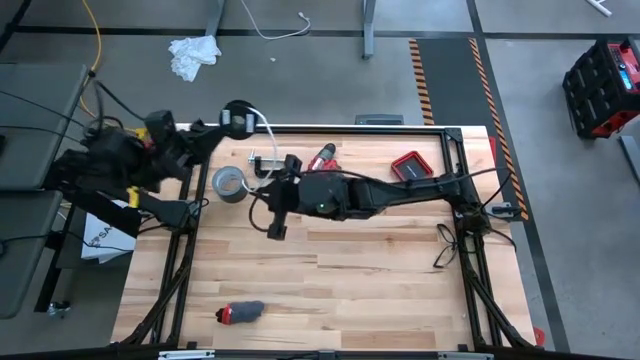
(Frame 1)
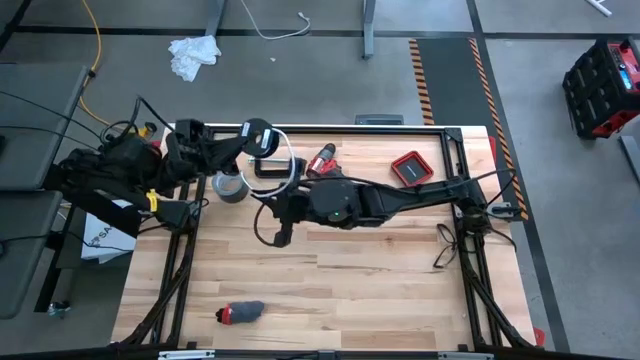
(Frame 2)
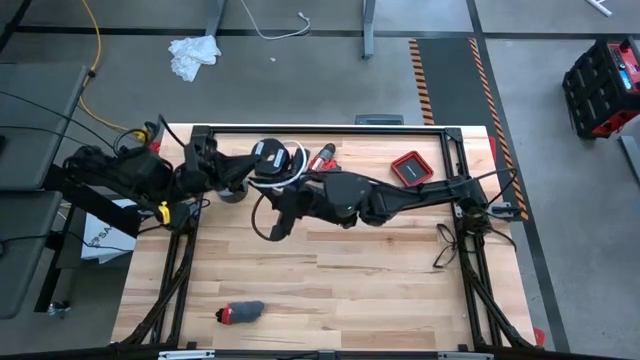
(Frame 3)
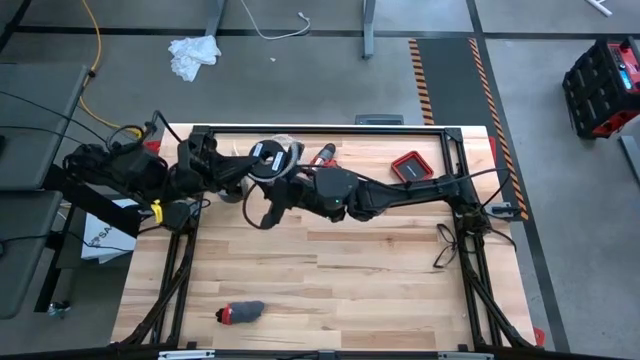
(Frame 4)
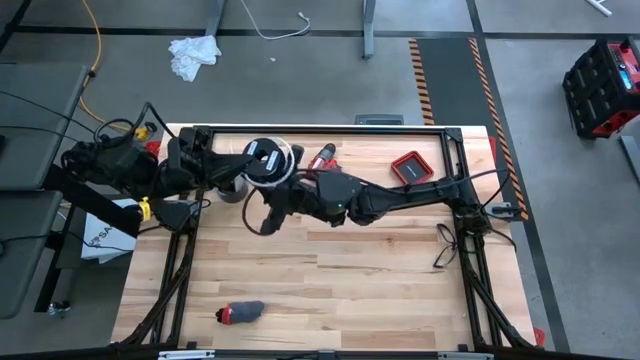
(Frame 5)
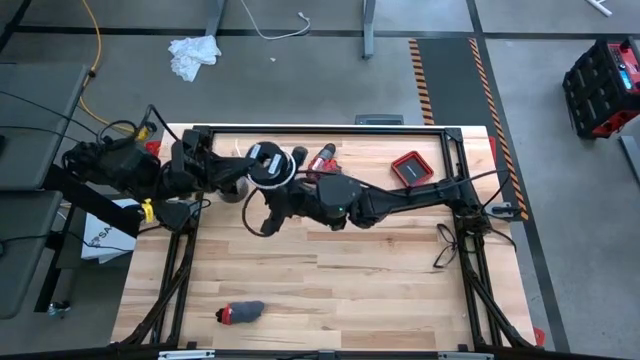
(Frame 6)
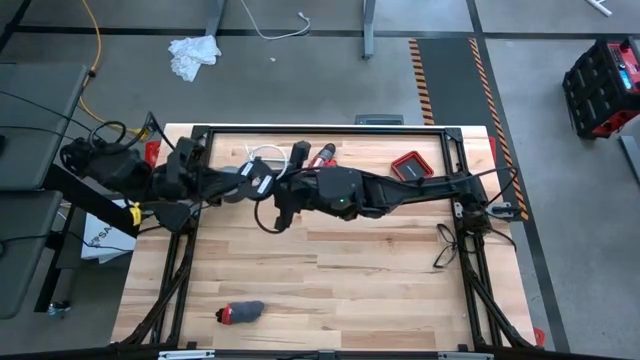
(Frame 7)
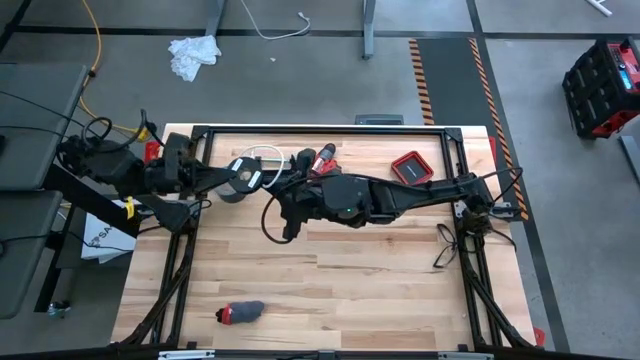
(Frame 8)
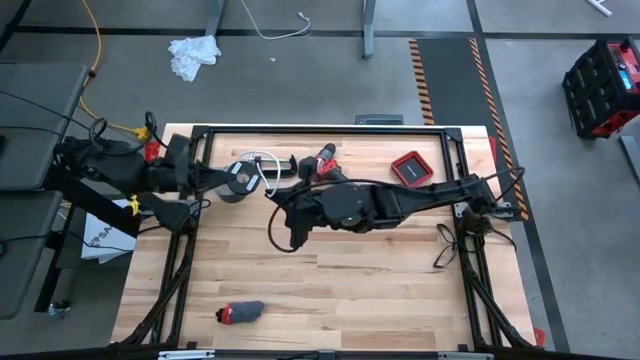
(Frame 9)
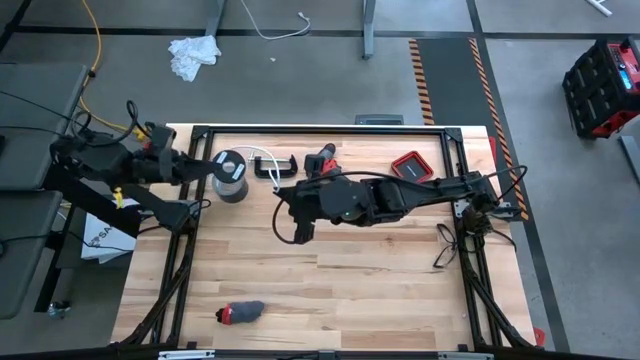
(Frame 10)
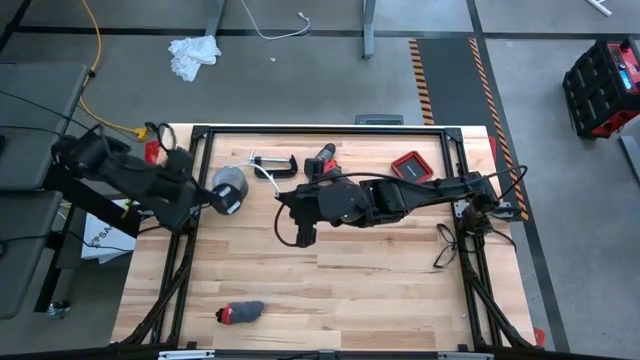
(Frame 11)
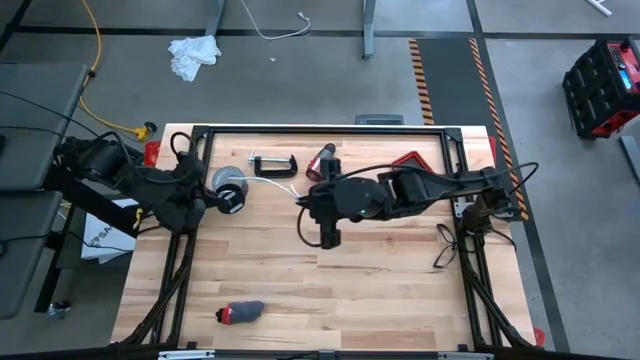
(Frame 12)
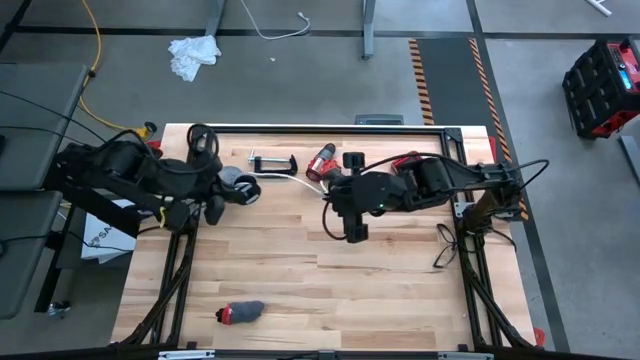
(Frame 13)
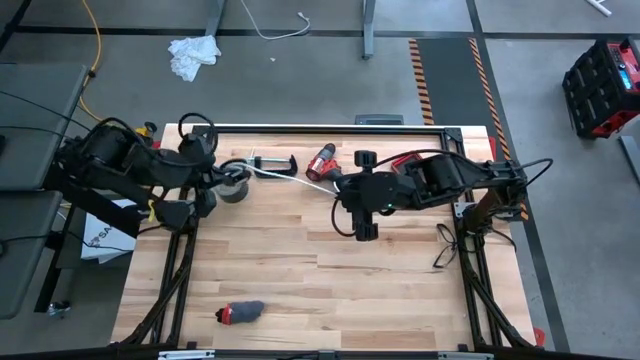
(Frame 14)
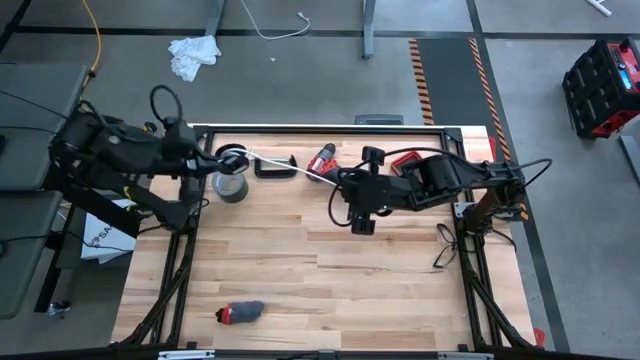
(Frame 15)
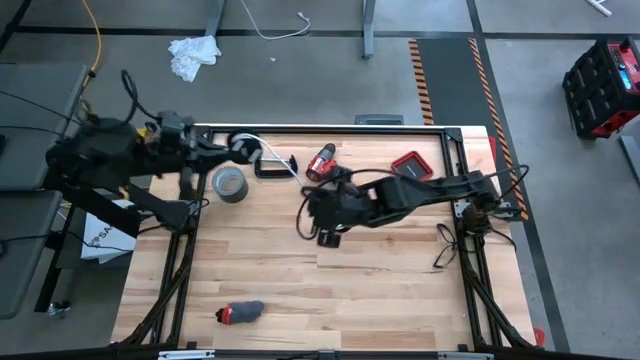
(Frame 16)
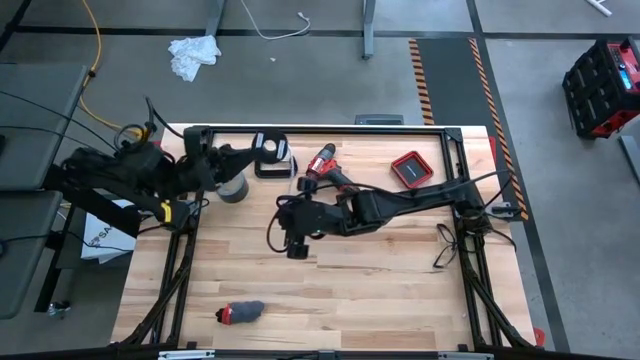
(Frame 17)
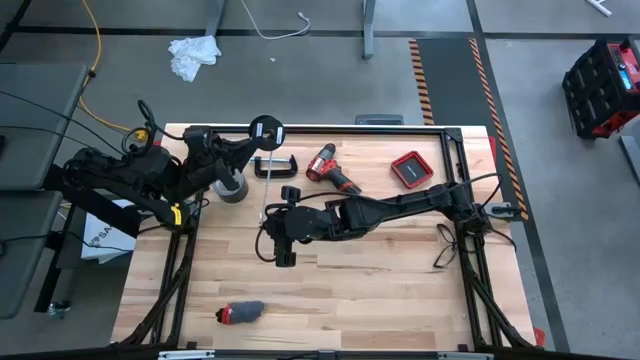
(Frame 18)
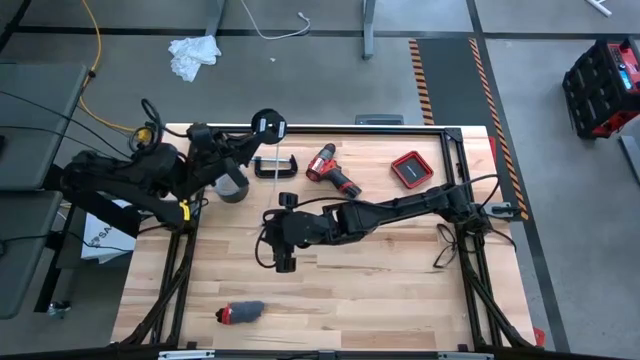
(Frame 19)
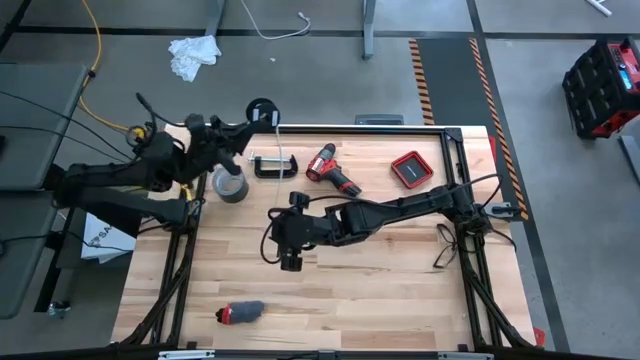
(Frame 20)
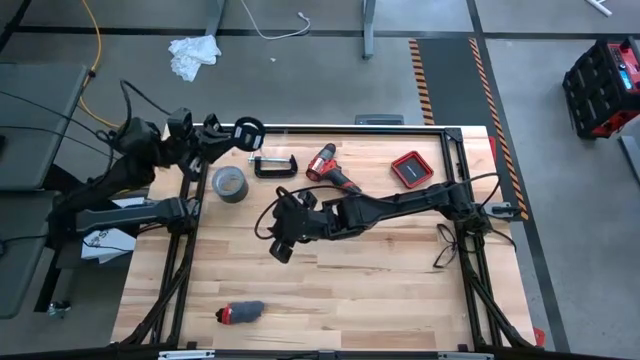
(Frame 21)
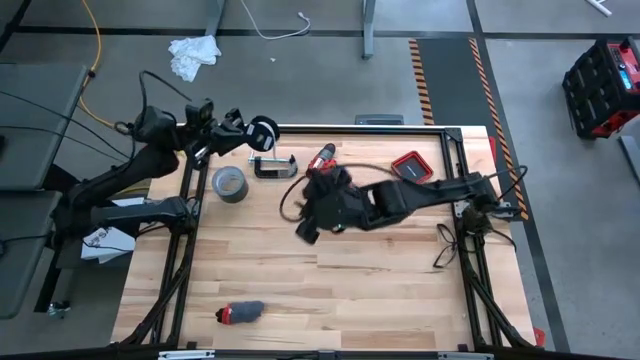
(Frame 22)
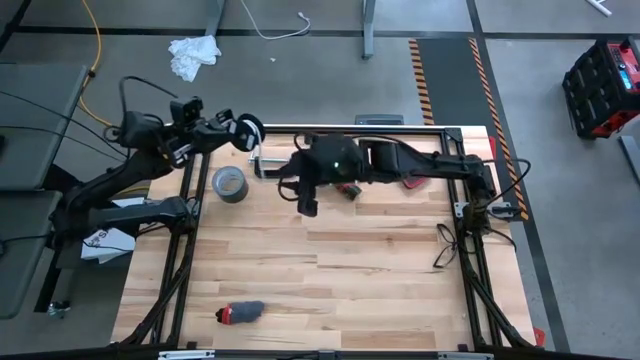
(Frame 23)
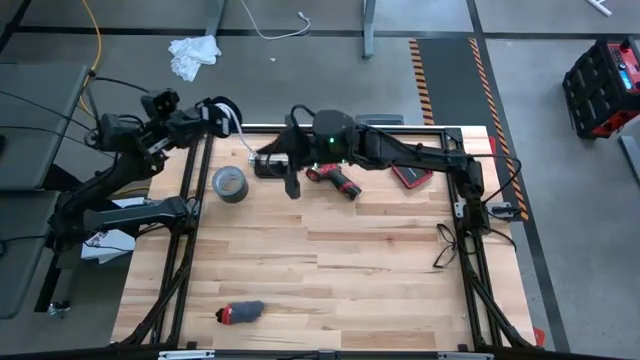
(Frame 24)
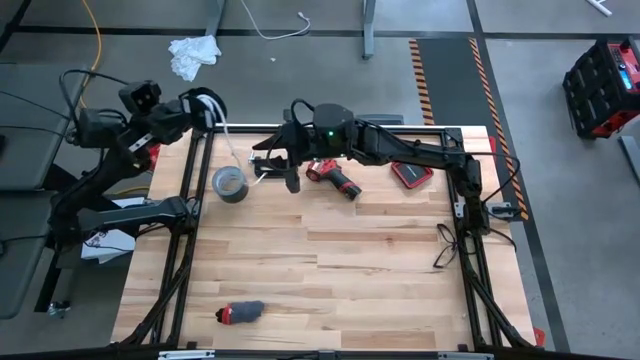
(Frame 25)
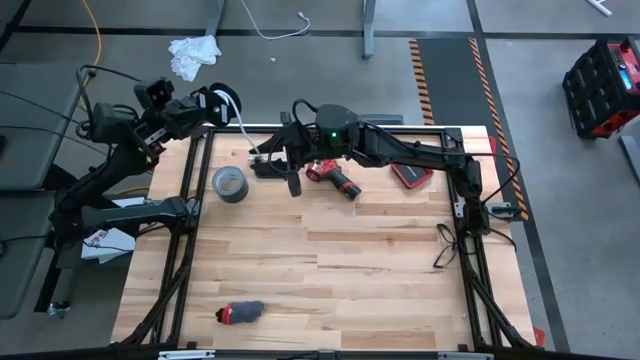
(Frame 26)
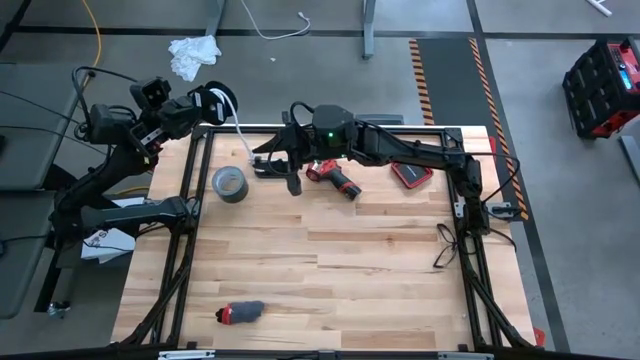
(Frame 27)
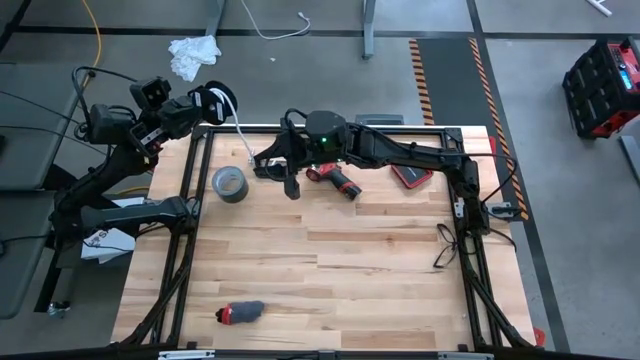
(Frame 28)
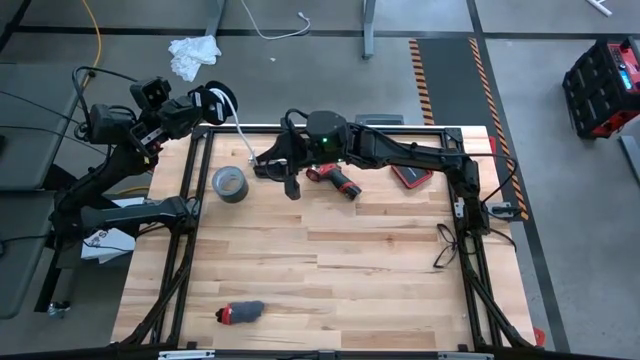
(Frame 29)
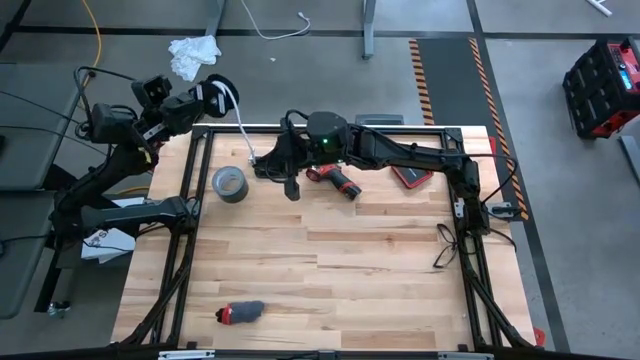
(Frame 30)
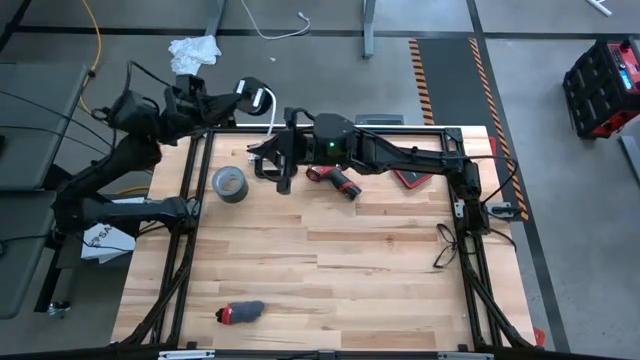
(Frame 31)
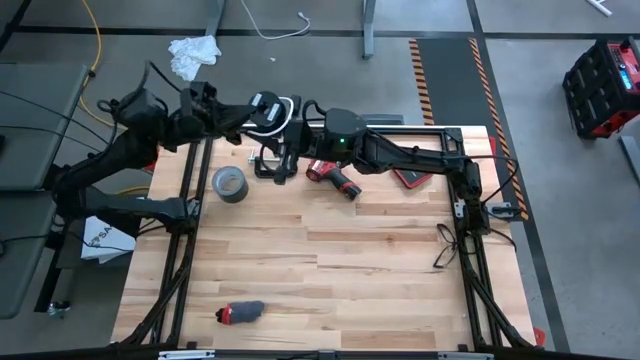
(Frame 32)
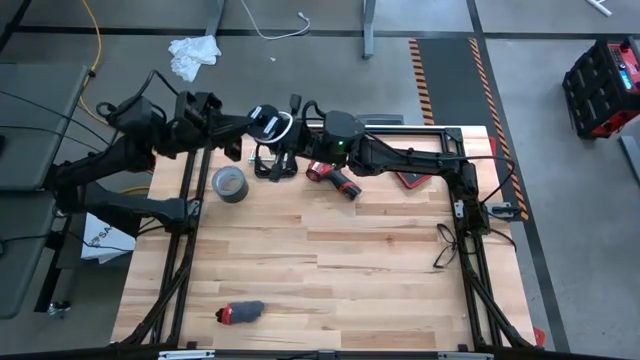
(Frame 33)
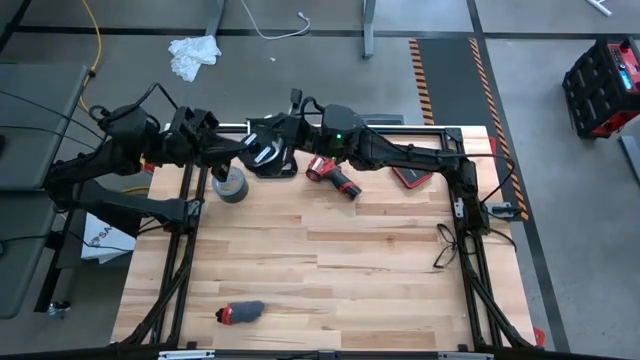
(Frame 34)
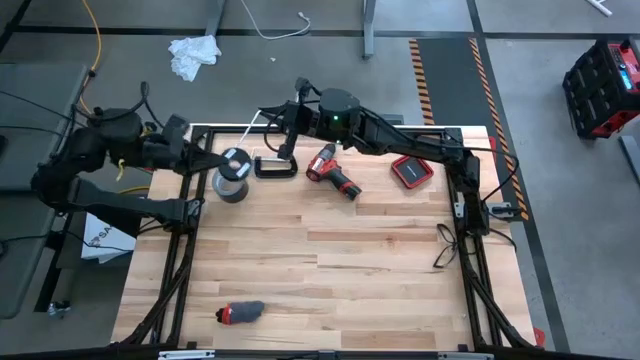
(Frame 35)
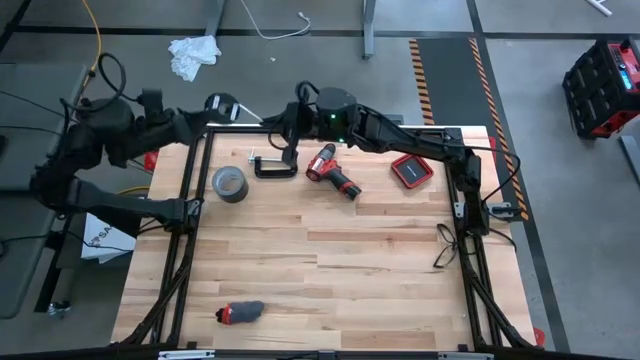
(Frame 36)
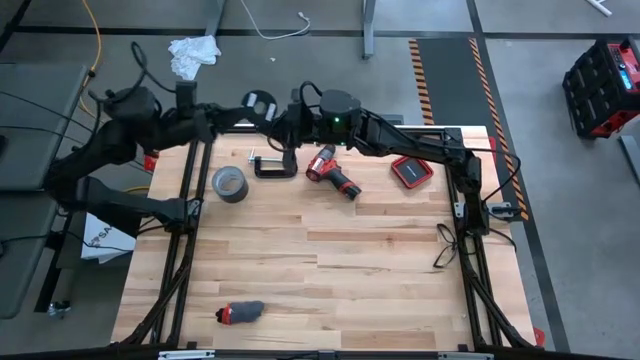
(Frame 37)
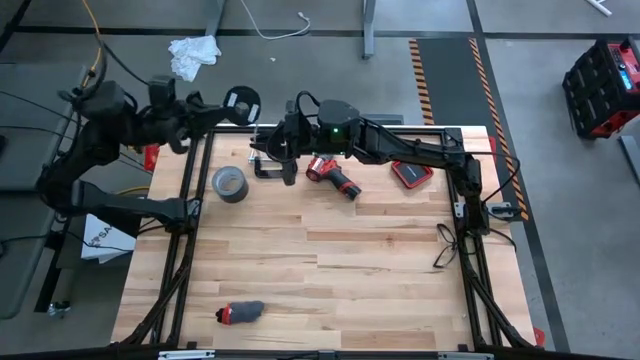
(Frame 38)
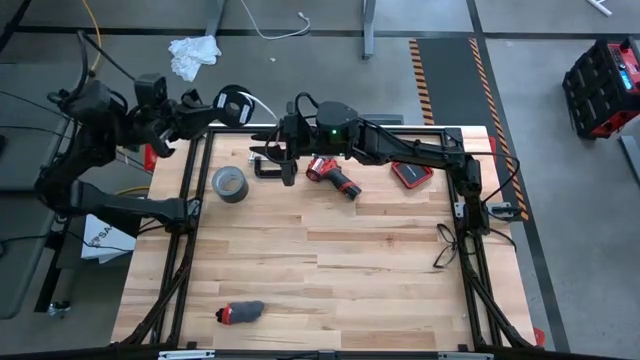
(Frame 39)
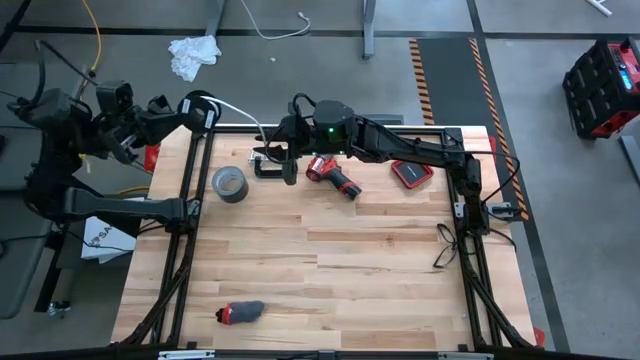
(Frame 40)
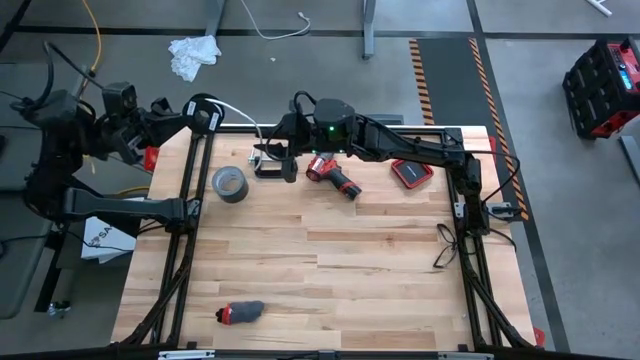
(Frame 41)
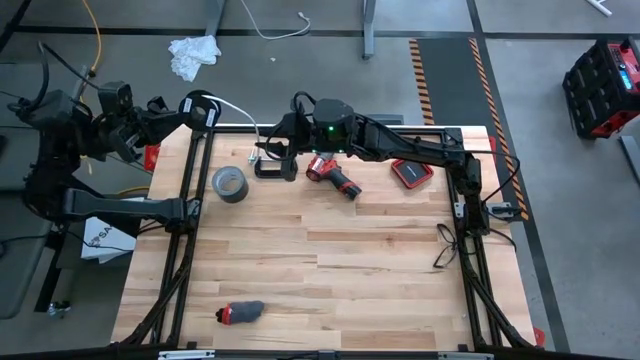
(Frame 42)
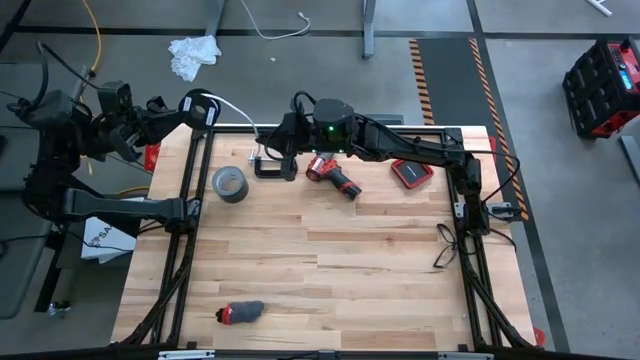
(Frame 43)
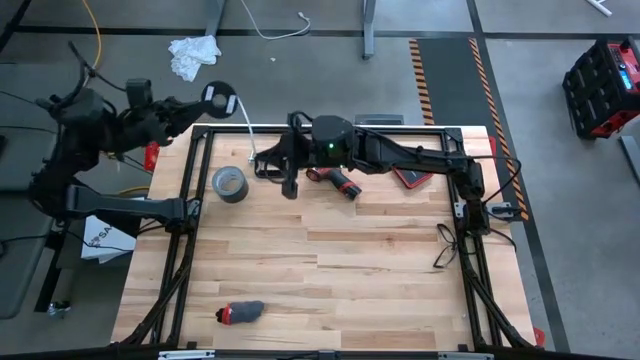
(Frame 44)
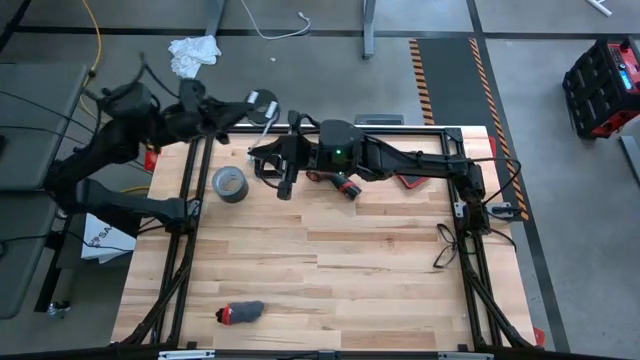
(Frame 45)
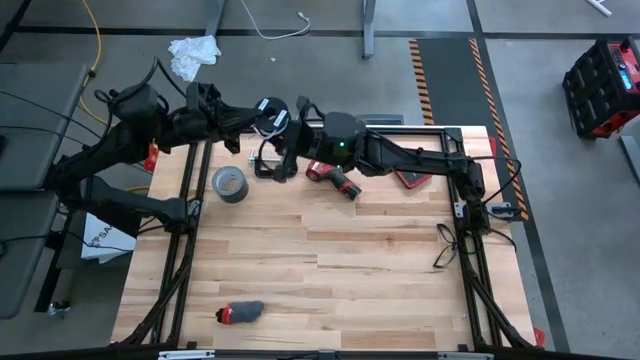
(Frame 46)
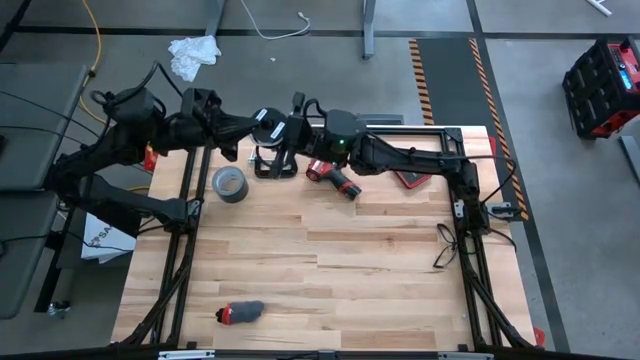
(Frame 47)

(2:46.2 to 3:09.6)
Task: Coil cords
Coil the white cable wire into the black spool
